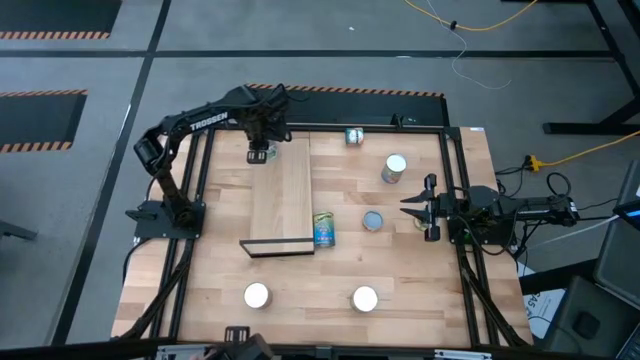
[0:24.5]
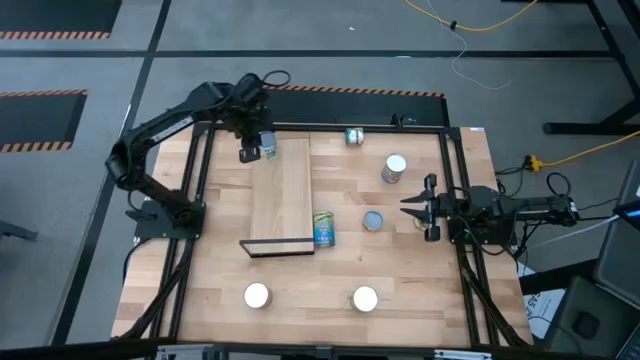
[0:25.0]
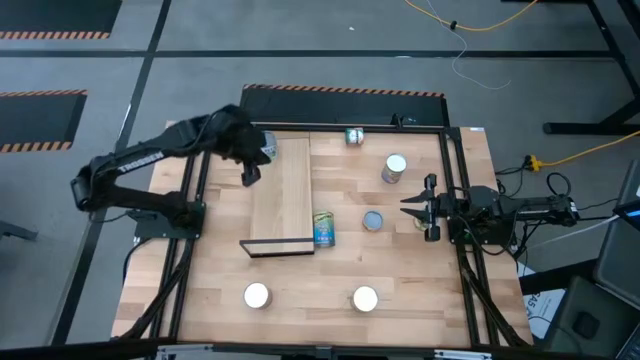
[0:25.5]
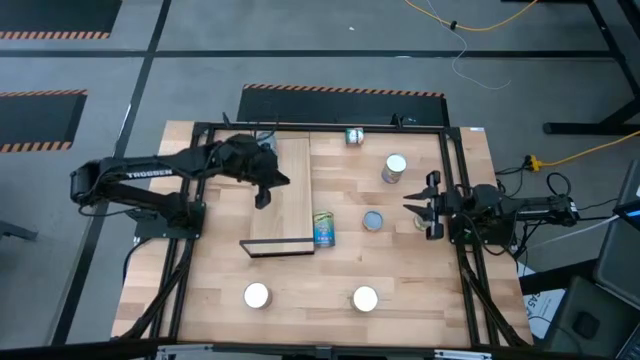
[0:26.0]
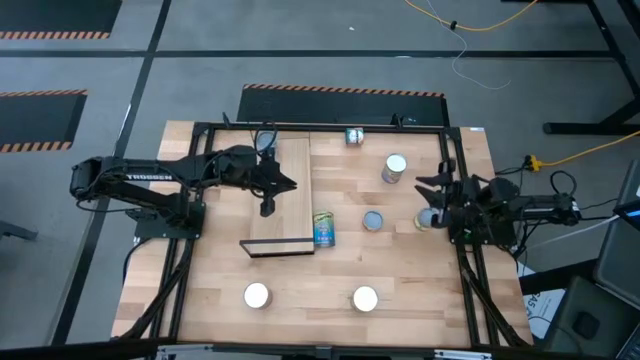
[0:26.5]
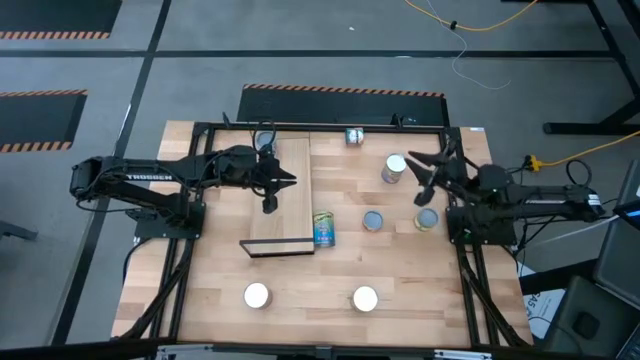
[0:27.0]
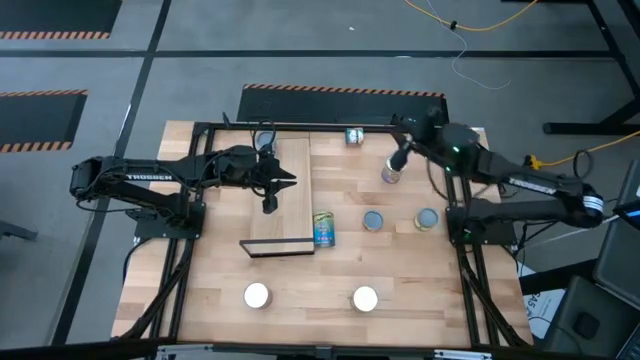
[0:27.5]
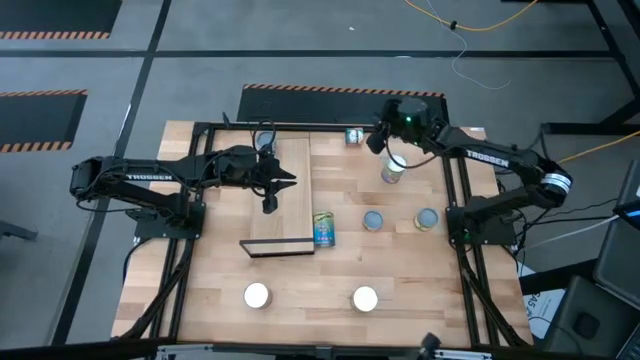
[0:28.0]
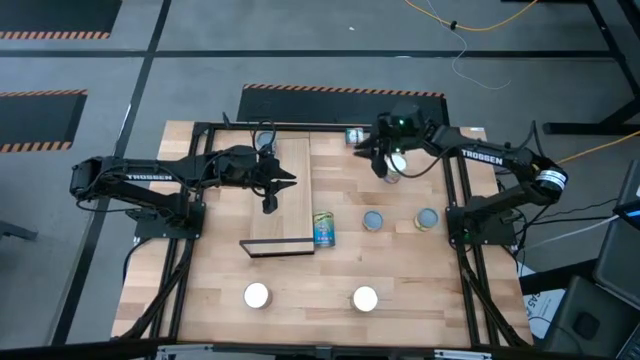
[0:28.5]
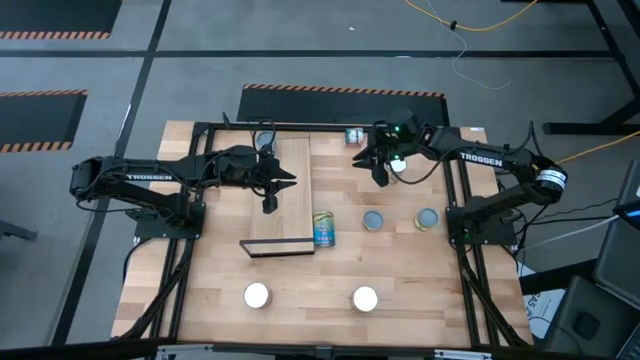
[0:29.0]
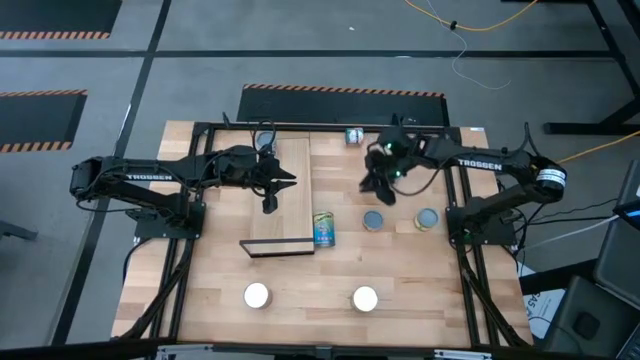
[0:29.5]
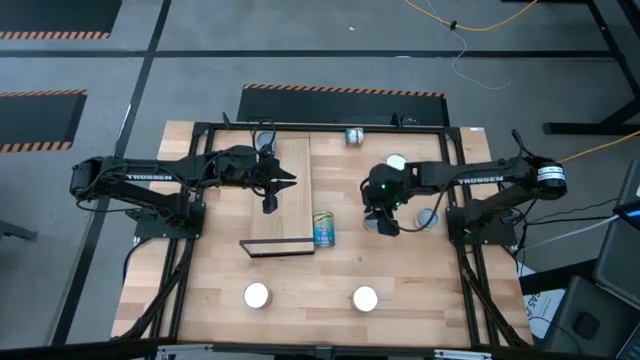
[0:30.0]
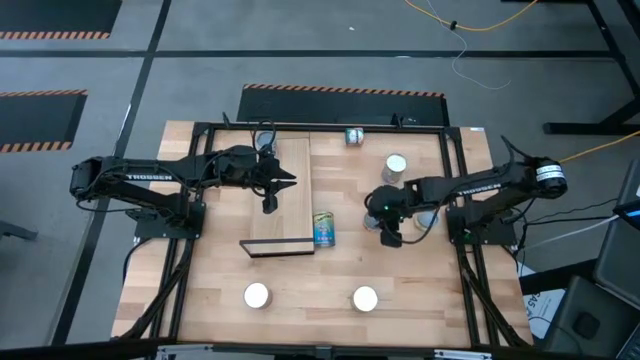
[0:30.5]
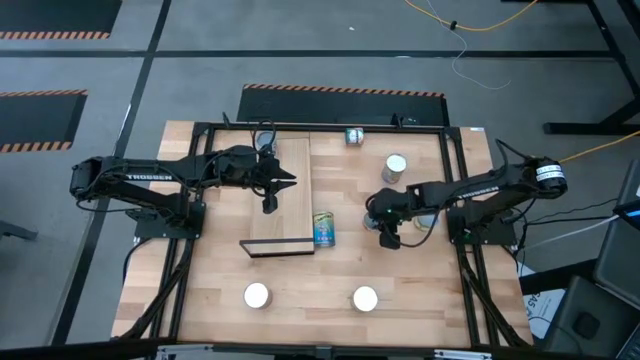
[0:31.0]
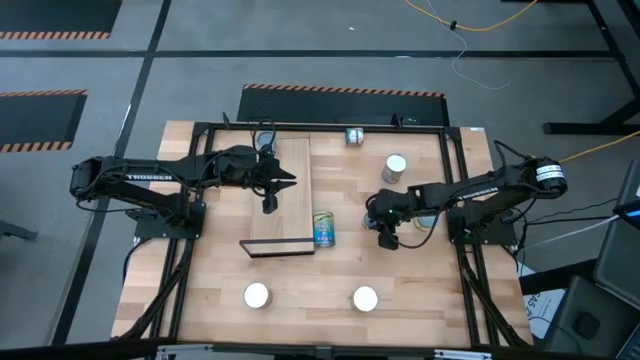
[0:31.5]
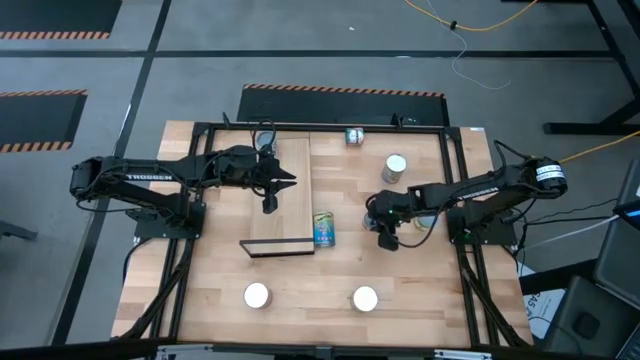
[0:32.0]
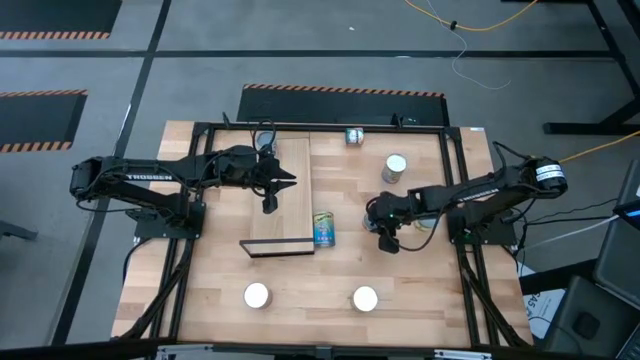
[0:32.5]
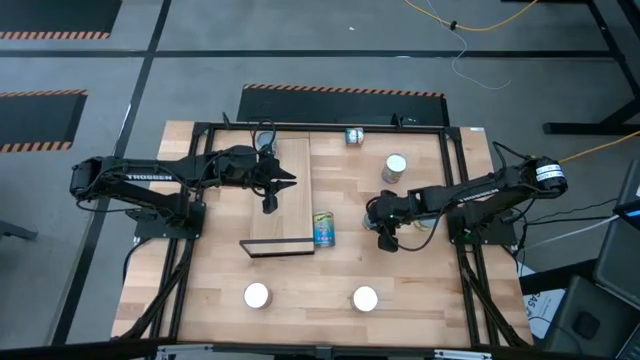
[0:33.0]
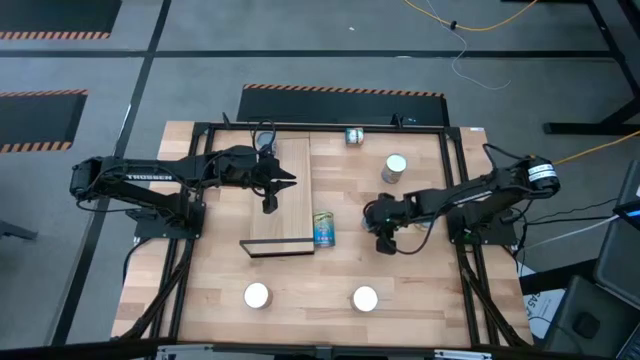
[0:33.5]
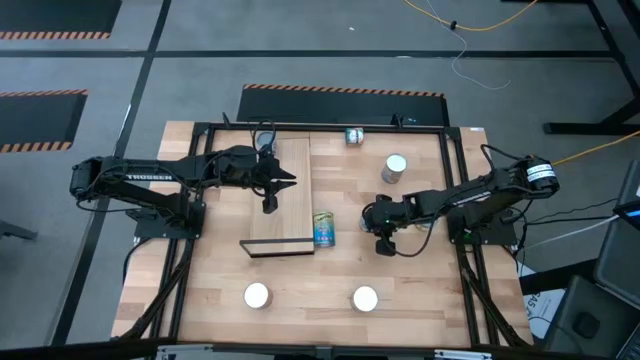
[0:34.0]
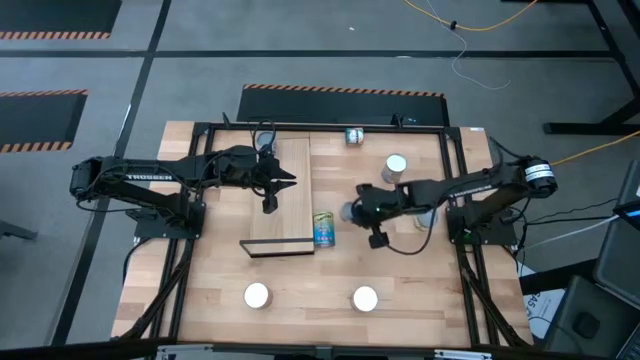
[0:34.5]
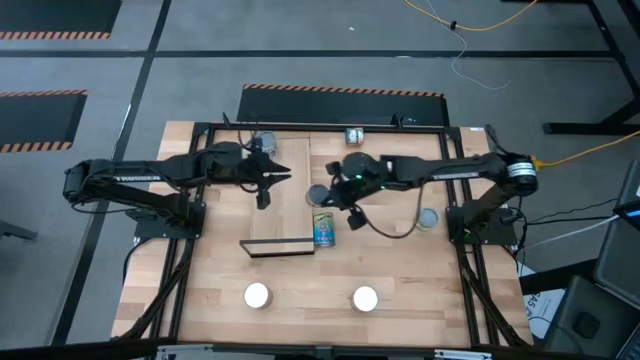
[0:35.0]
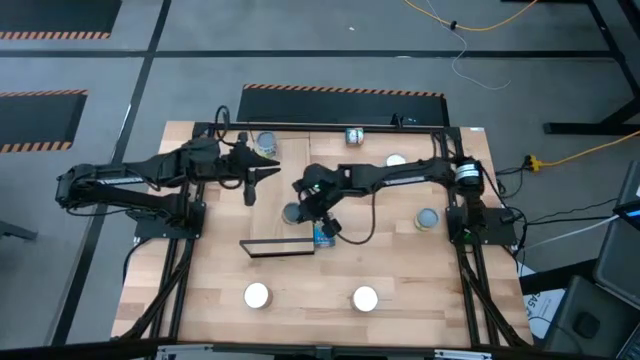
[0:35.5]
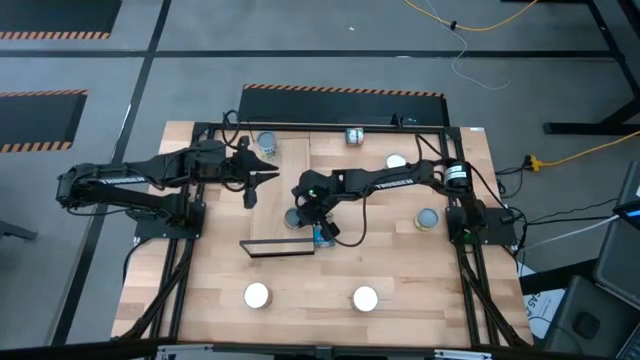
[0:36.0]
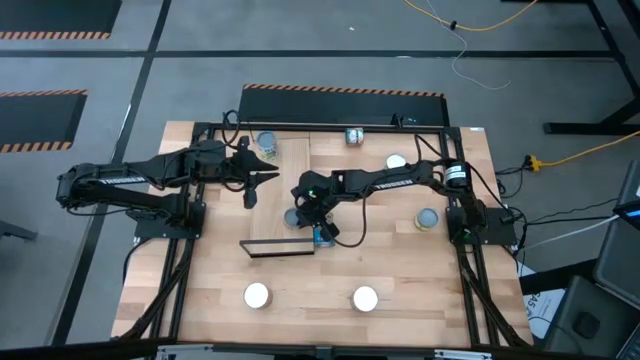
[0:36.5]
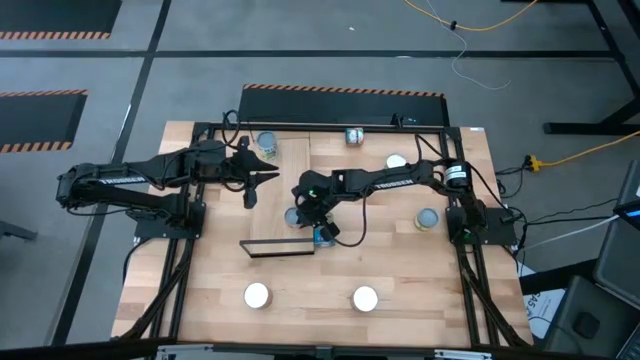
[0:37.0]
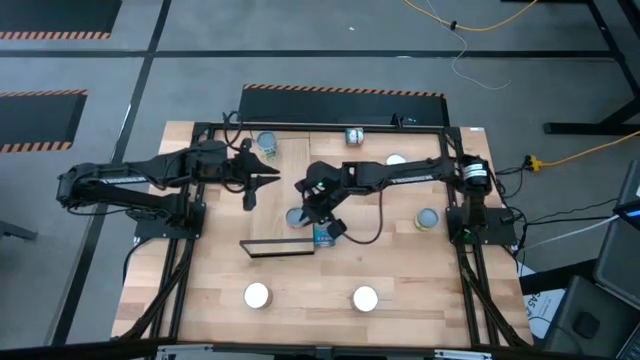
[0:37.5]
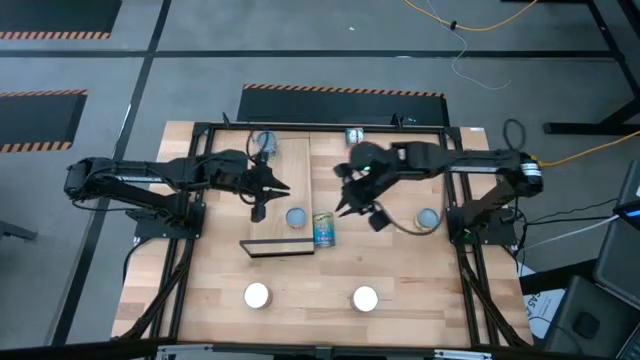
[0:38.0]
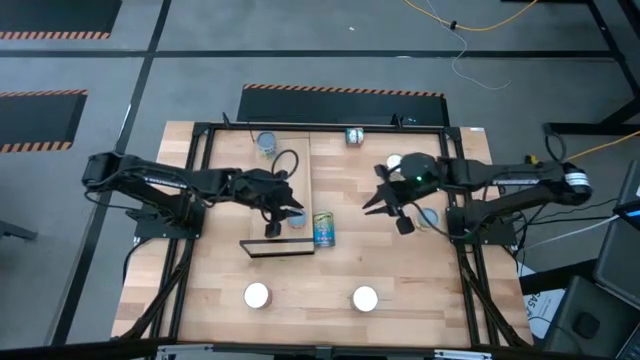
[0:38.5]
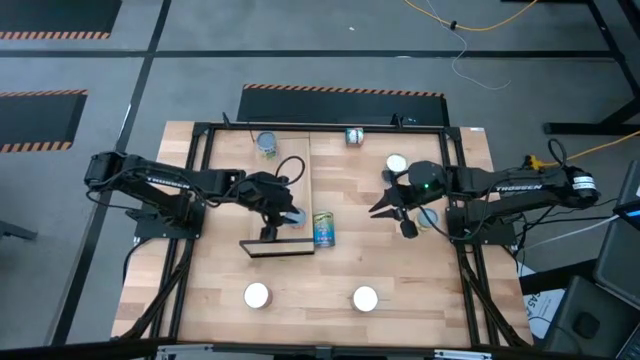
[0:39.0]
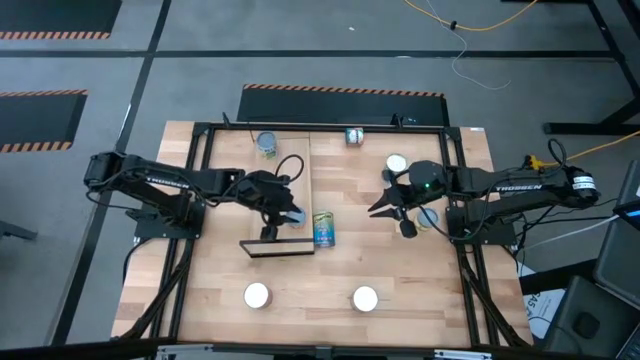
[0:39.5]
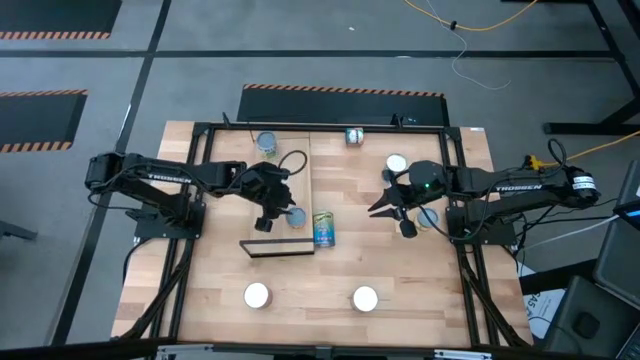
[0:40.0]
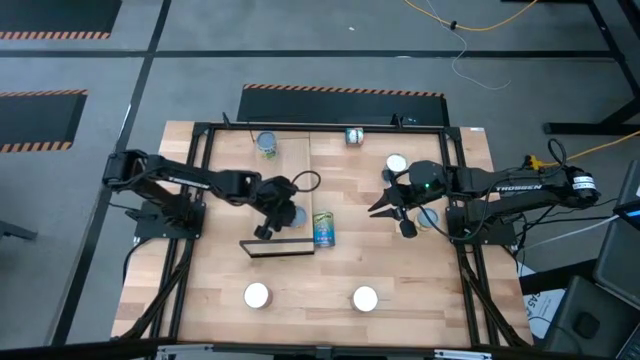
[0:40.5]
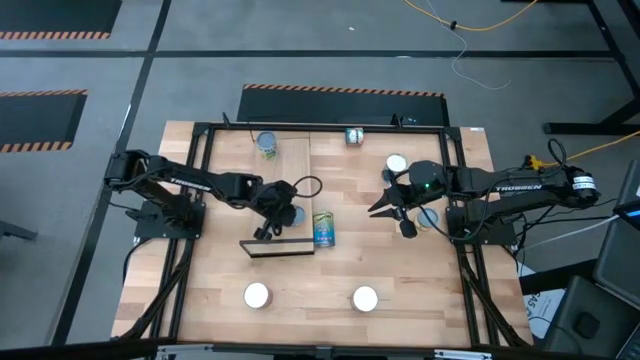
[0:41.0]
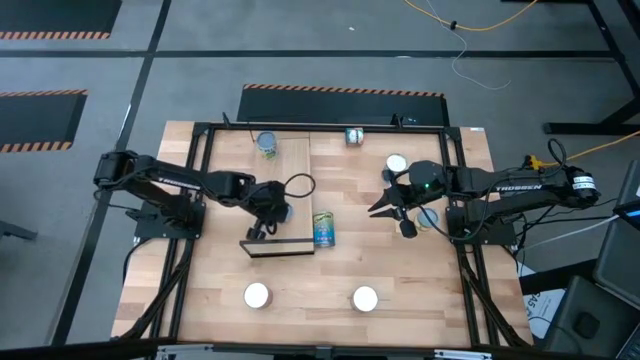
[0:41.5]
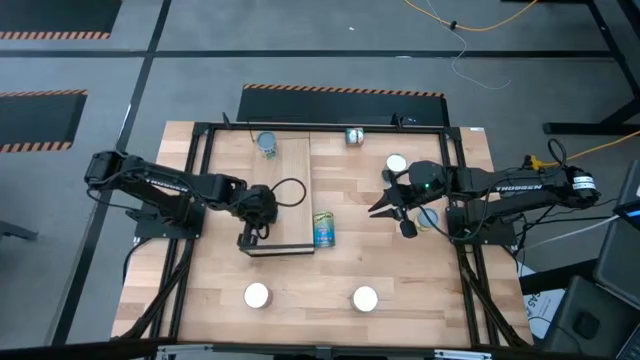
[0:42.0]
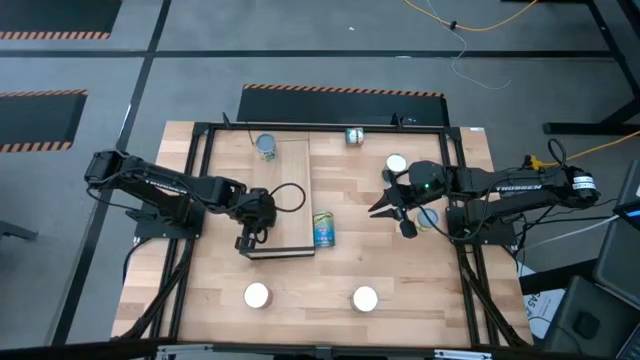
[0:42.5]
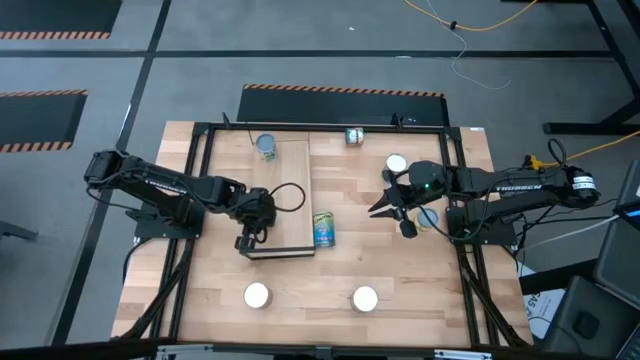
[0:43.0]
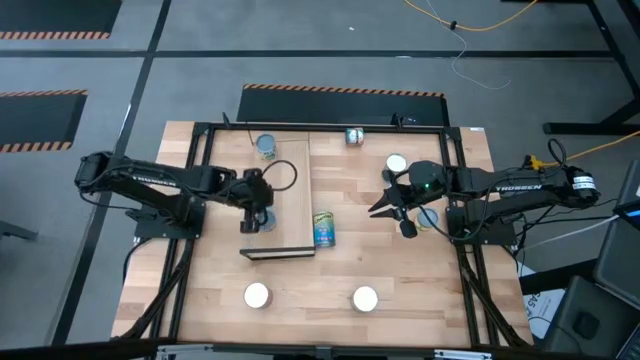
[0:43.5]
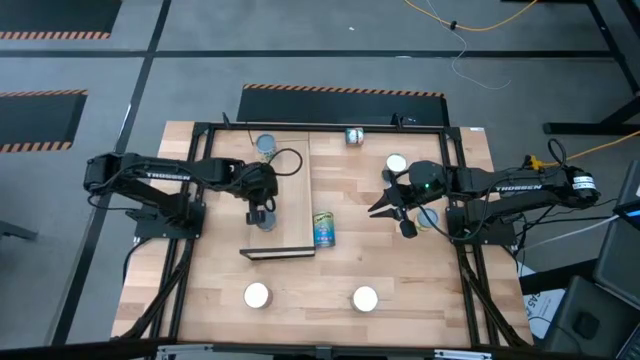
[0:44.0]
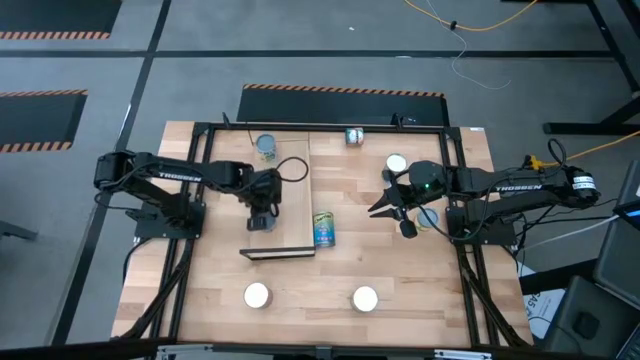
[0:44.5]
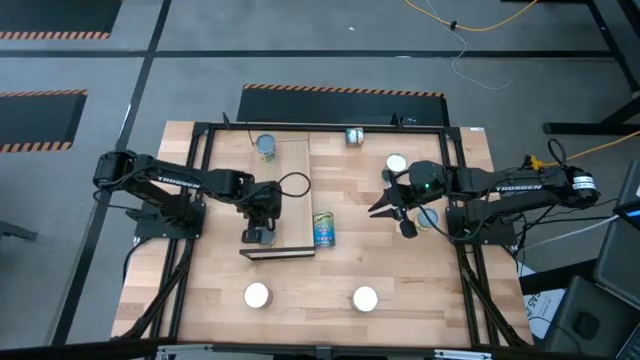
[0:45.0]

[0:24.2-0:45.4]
Task: Pick and place cans onto a shelf
Put the small canned pineapples on the shelf

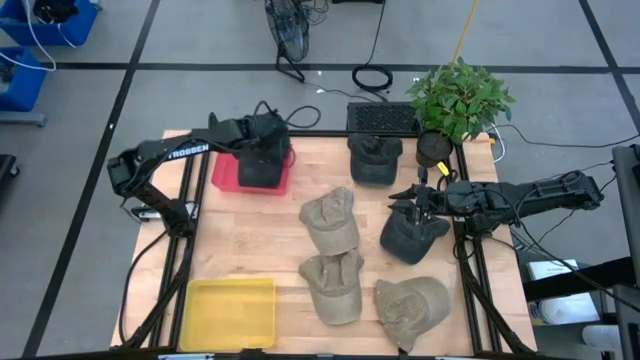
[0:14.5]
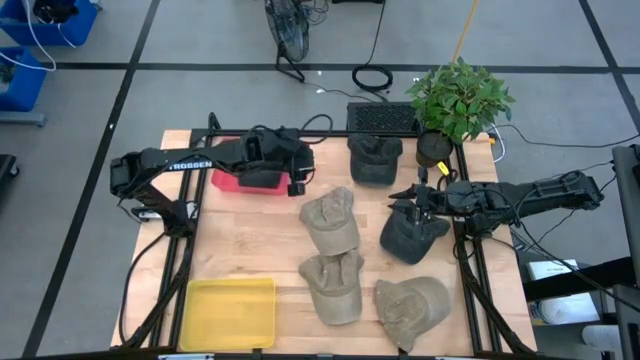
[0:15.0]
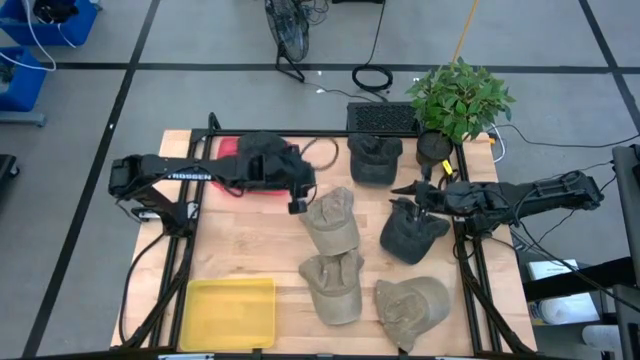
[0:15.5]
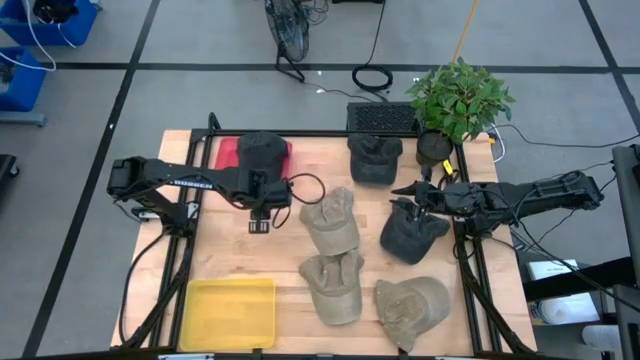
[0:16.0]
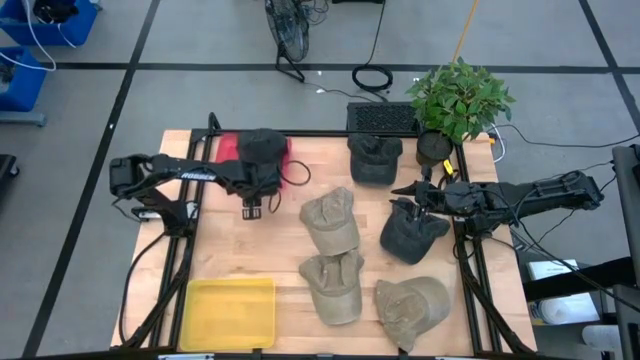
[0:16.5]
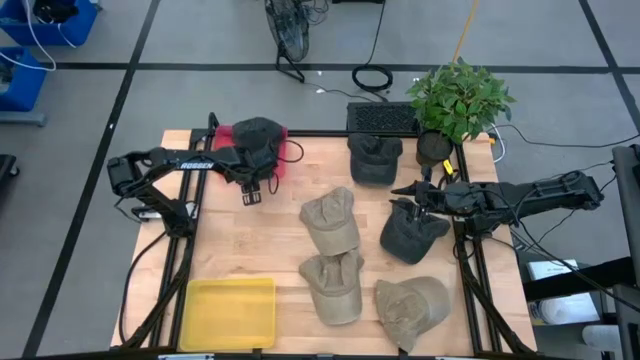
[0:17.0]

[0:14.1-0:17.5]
Task: Pick & Place hat
Adjust the red bin
